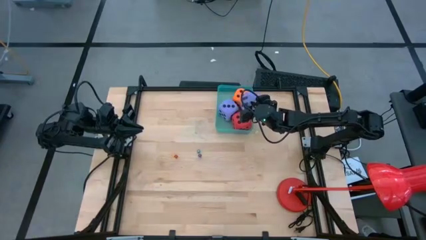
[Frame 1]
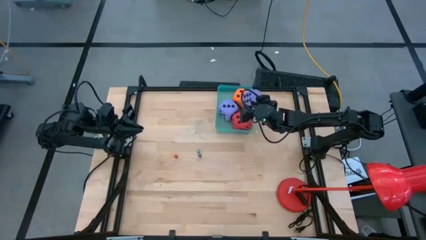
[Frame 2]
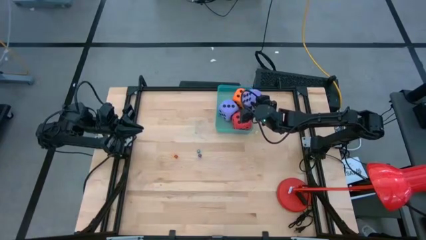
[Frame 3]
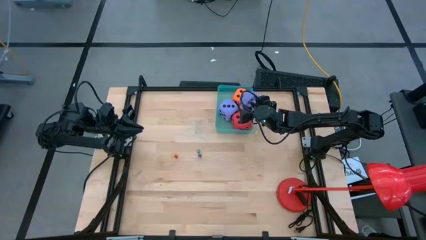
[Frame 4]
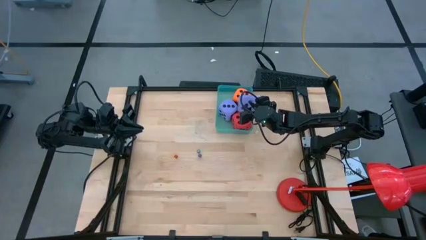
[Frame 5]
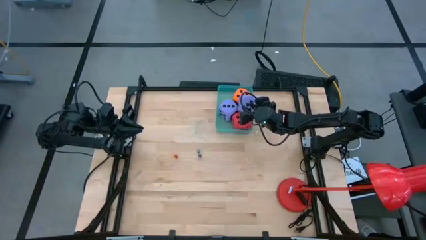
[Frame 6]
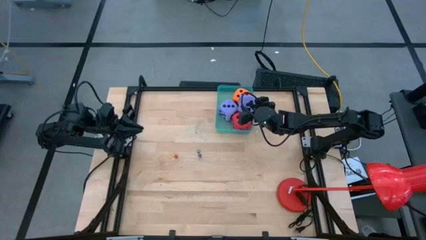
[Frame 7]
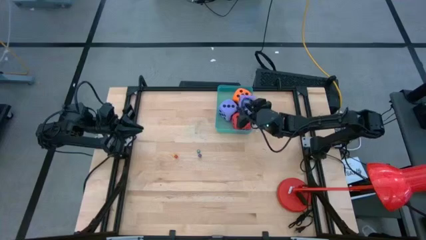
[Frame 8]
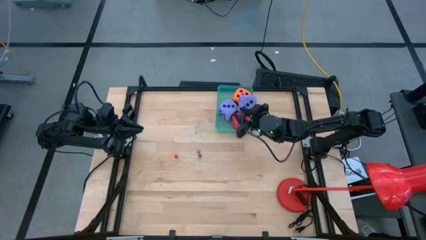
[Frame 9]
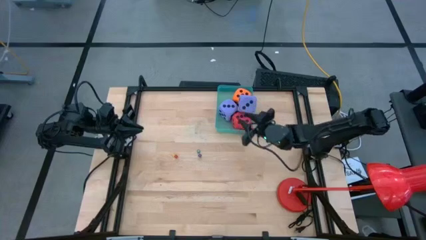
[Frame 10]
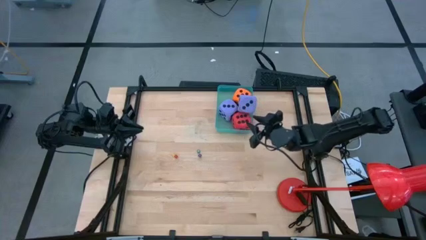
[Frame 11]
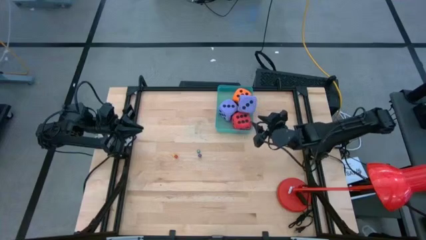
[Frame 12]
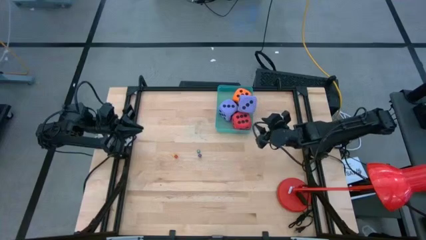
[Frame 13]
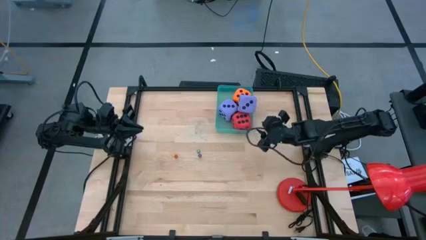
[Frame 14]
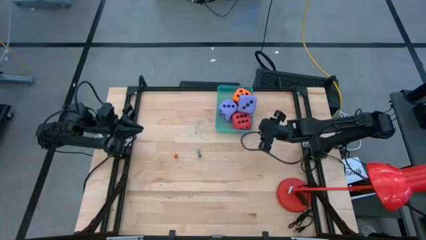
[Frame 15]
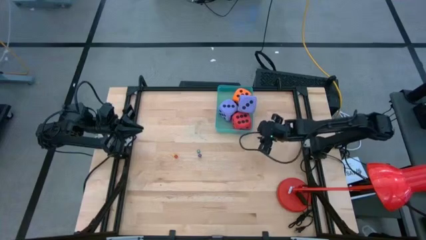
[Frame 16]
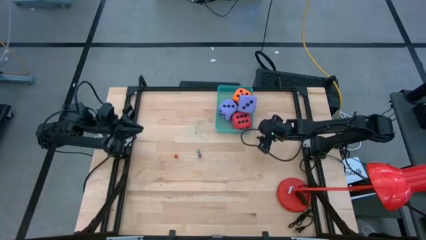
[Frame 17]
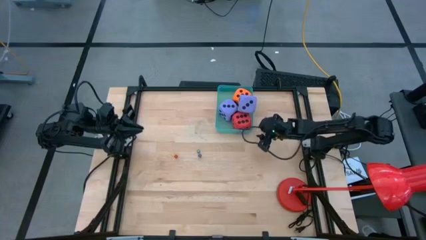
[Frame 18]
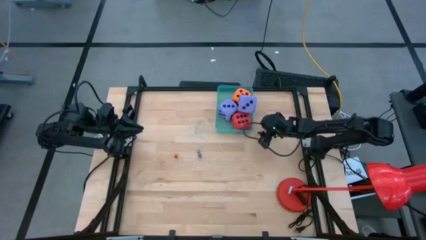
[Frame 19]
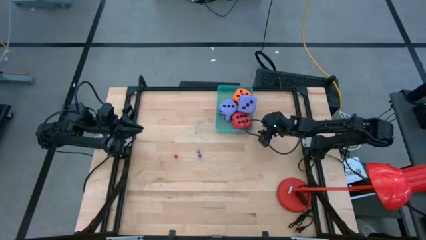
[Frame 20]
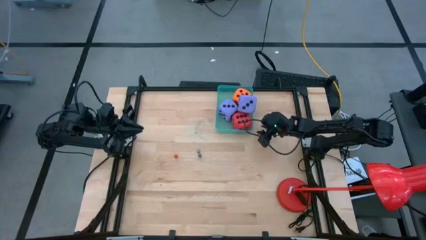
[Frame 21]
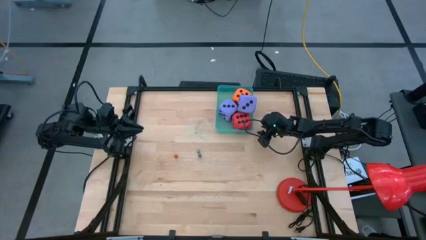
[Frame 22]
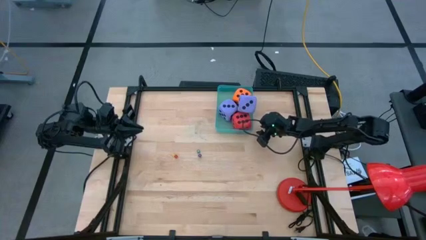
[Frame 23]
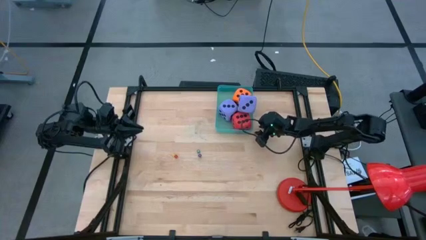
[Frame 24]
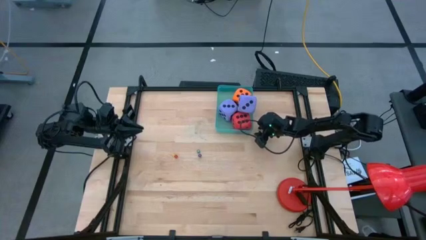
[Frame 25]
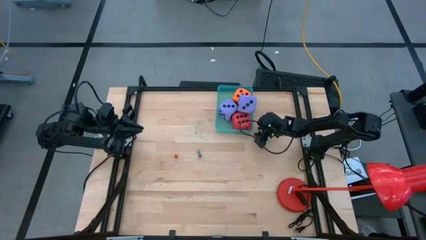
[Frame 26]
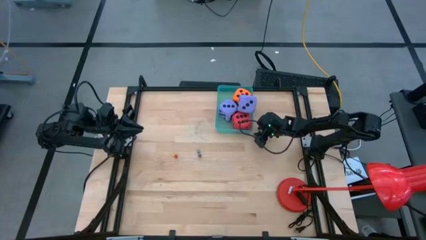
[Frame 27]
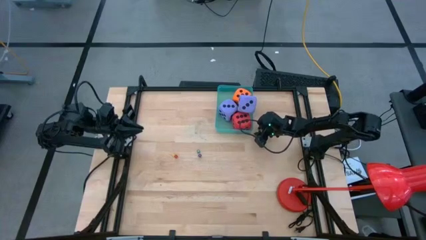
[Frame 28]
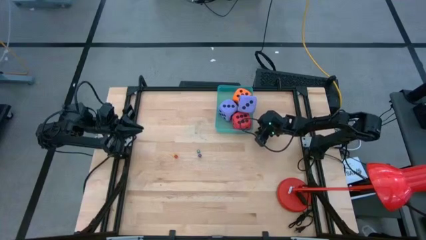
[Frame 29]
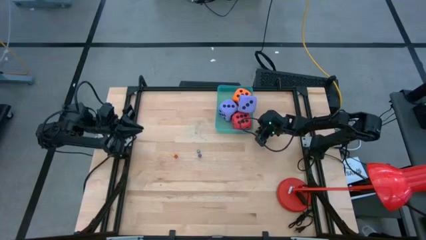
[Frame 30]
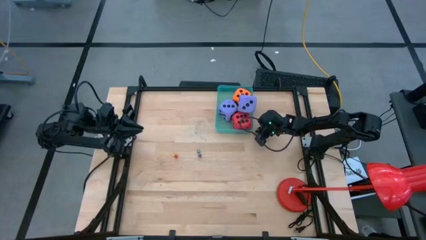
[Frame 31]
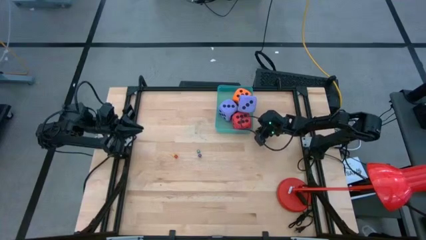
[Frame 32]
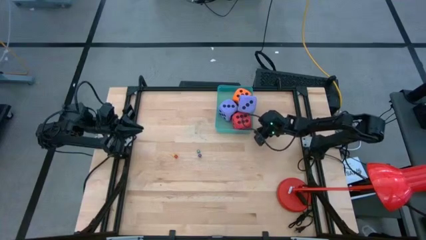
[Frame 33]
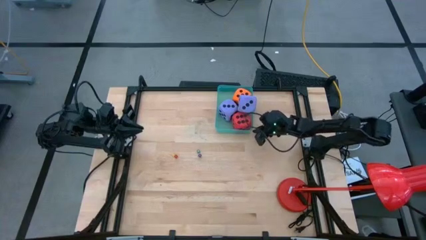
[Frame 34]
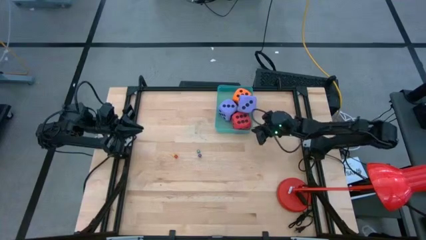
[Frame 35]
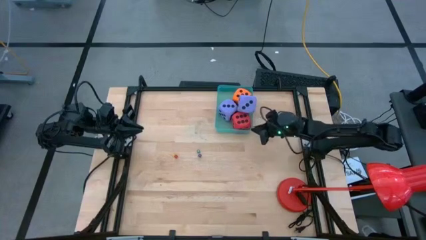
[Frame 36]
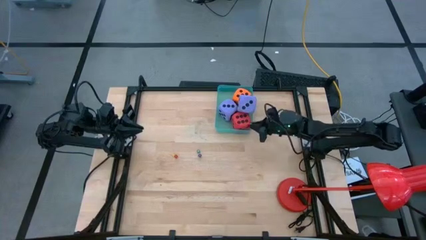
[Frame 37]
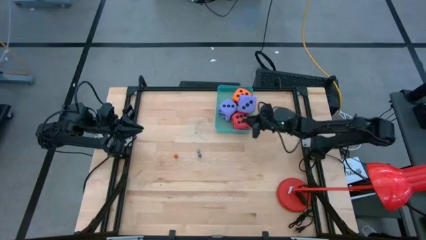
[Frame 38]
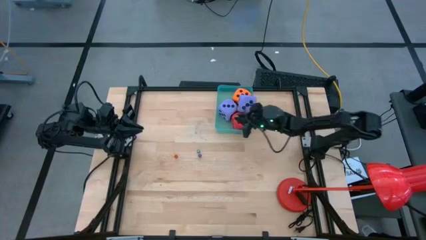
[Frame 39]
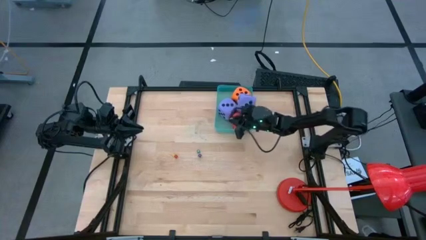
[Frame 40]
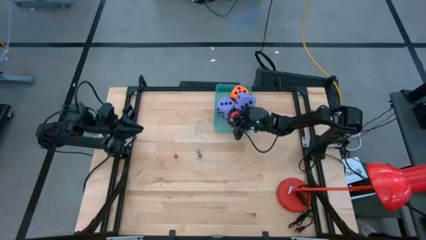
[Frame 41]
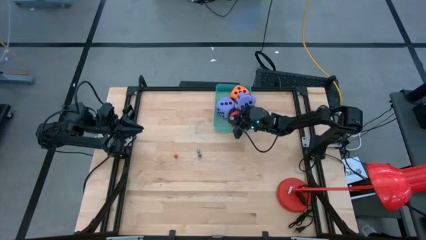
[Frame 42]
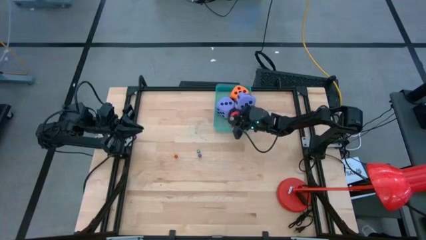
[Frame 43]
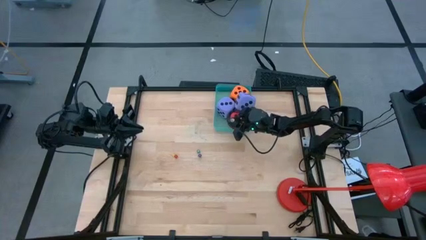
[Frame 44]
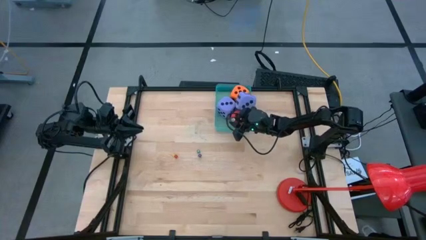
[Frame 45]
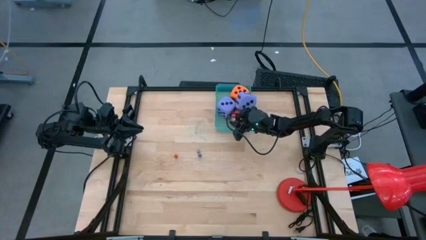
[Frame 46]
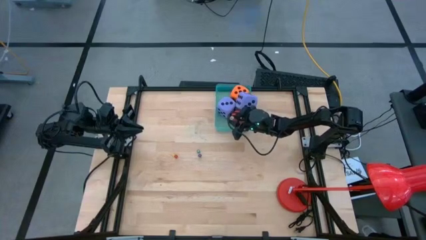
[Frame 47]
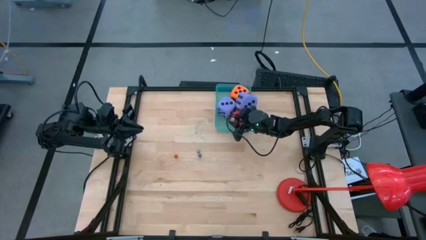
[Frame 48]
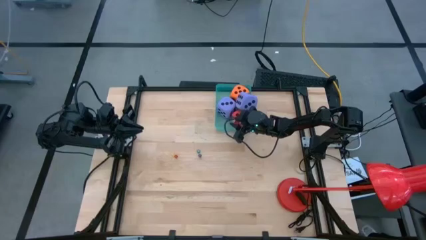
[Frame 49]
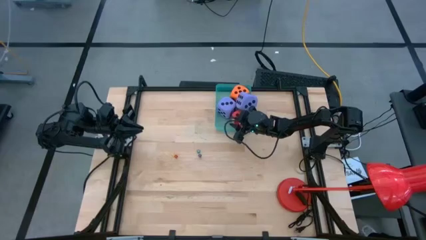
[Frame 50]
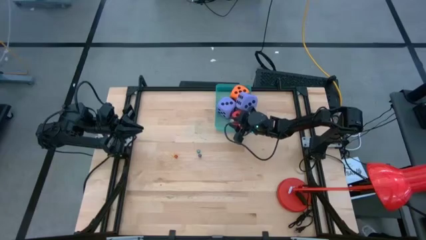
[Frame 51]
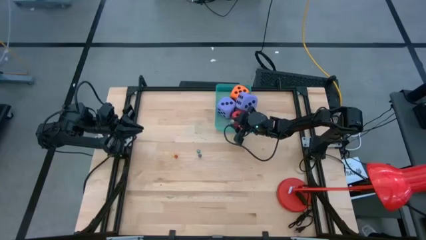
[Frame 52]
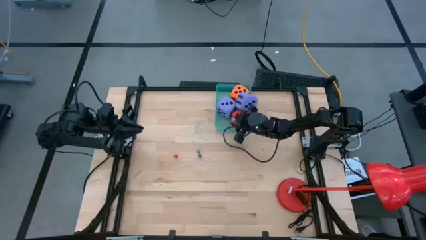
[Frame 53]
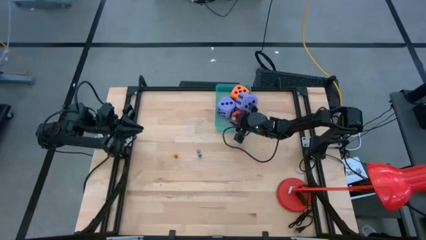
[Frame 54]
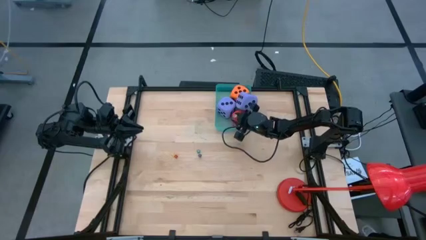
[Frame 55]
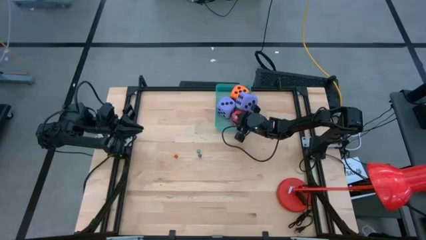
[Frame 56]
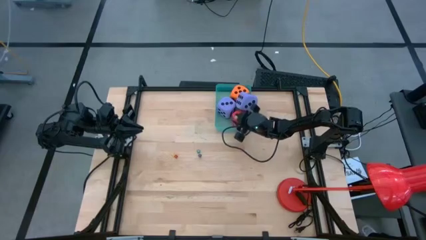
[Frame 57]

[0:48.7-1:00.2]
Task: Pick & Place Dice
Put the light green die into the green bin

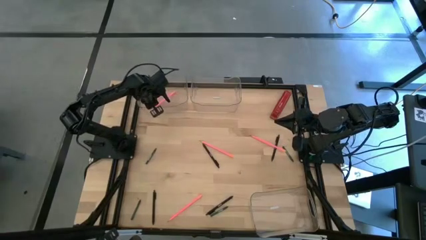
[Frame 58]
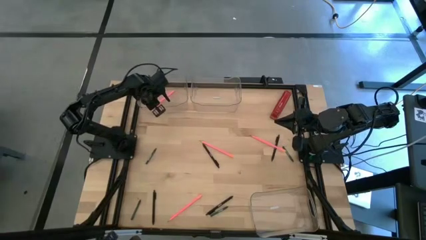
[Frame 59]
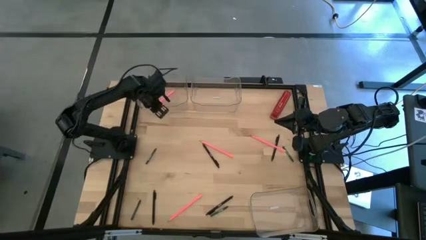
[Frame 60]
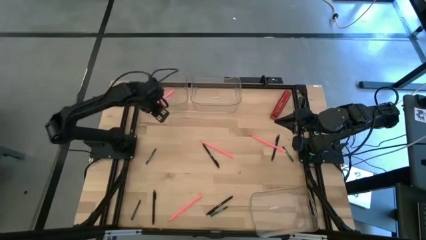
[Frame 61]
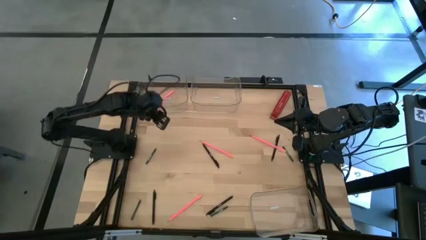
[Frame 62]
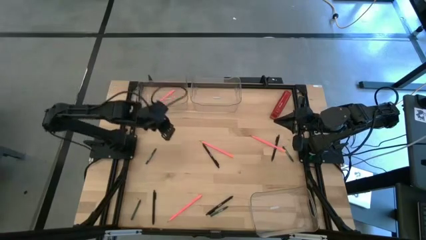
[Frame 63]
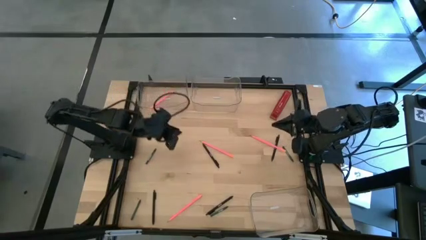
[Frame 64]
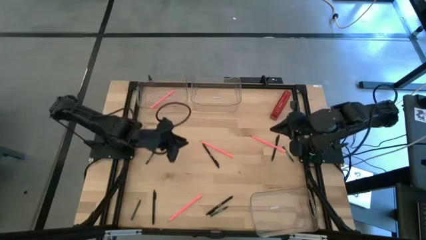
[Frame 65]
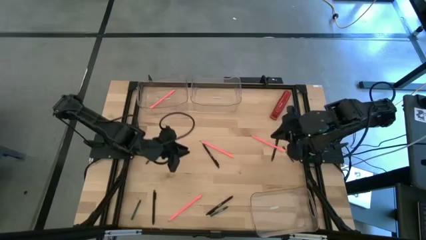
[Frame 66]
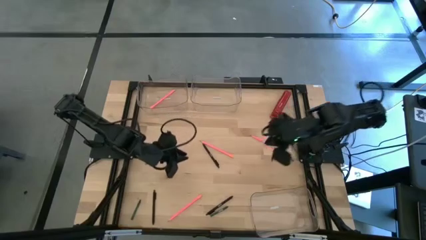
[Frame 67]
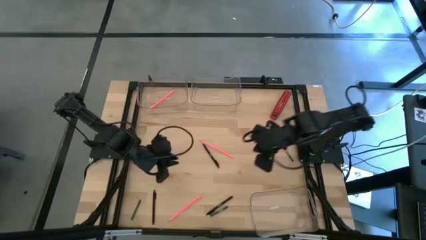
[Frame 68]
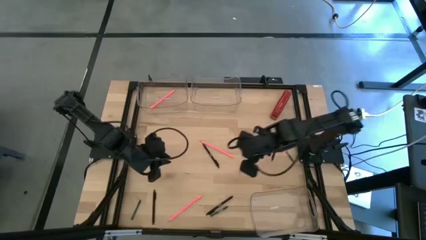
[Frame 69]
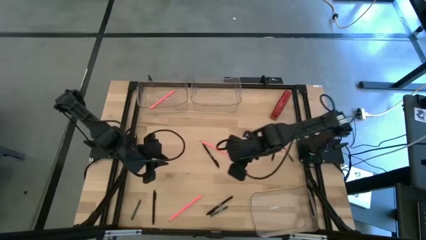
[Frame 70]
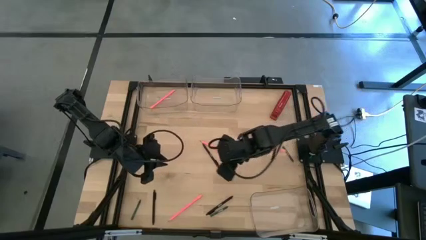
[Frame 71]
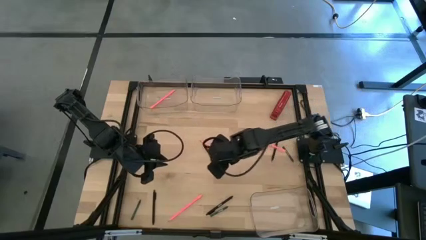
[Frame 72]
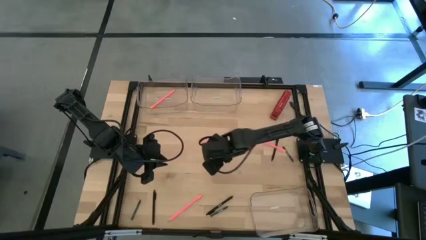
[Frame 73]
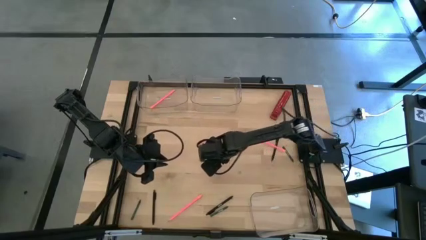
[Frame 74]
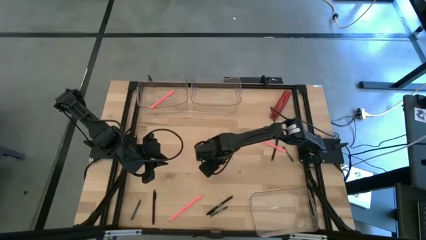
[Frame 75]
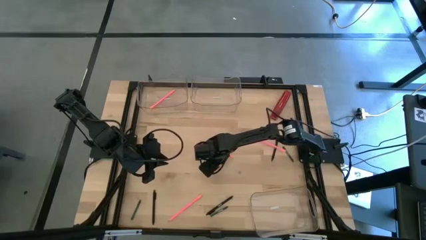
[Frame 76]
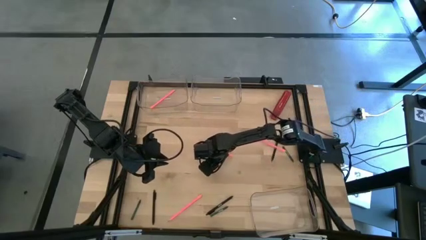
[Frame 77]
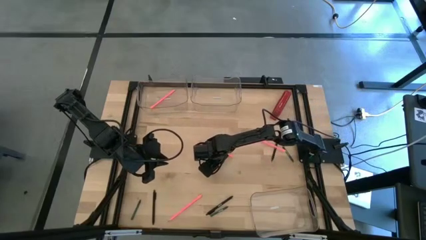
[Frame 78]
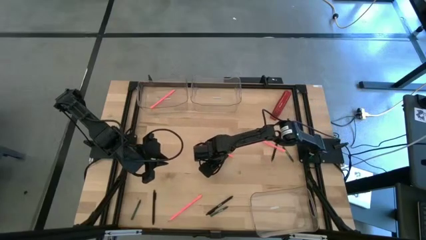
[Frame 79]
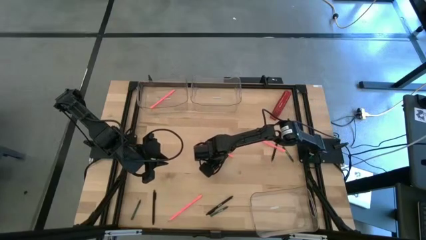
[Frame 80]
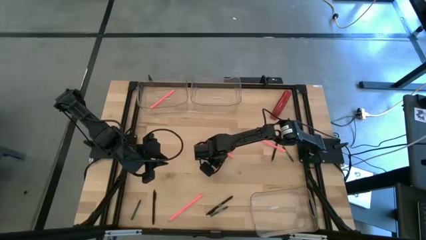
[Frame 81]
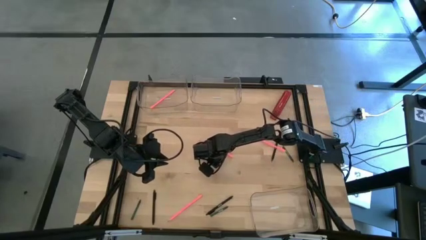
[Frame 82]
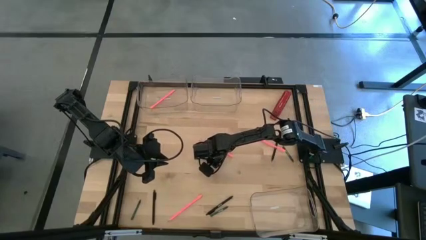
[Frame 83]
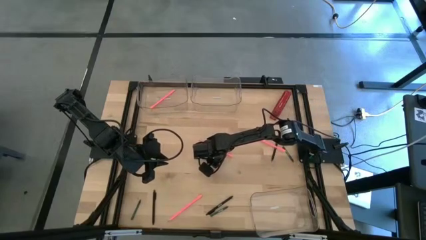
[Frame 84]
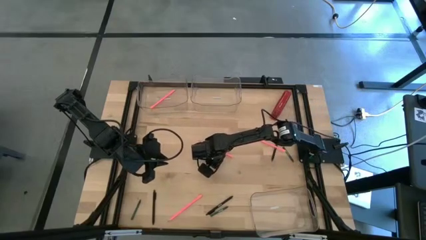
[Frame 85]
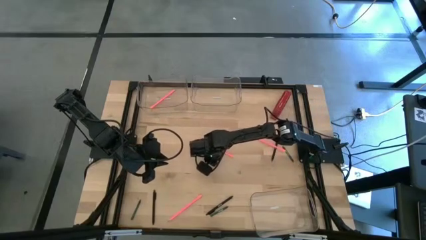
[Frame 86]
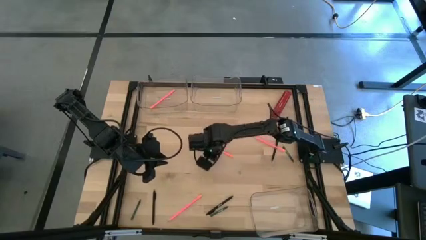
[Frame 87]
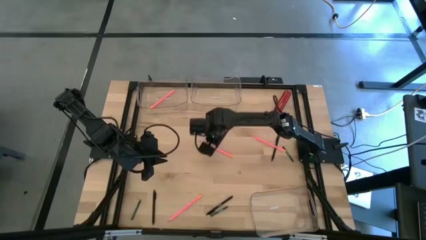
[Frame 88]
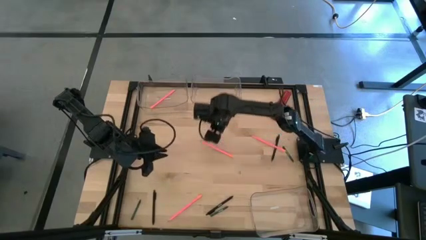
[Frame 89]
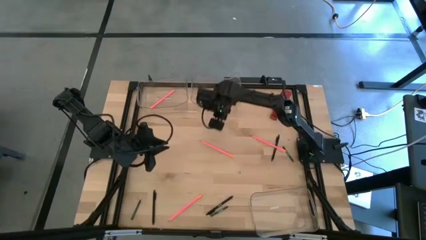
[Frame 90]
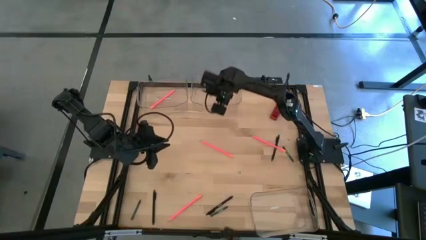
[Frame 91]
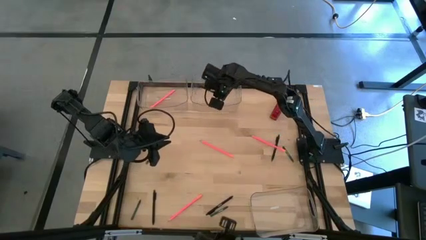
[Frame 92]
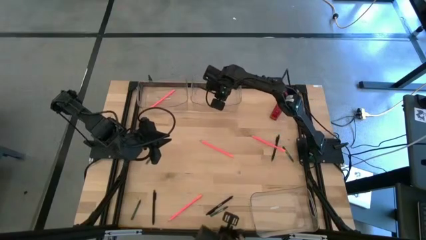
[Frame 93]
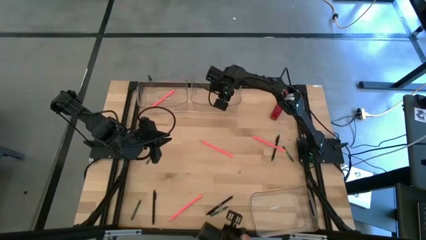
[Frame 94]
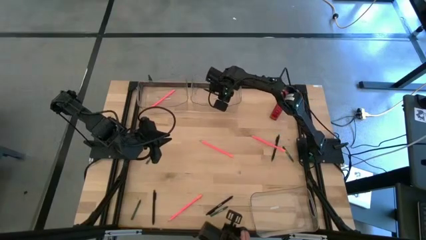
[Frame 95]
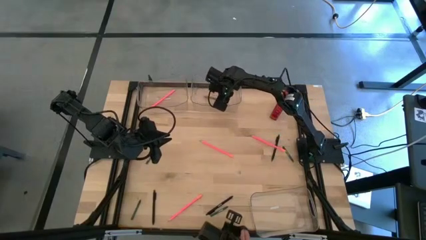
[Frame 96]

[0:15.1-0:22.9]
Task: Sort crayons/erasers/pens/pencils in bins
Put the black pen into the top right transparent bin
